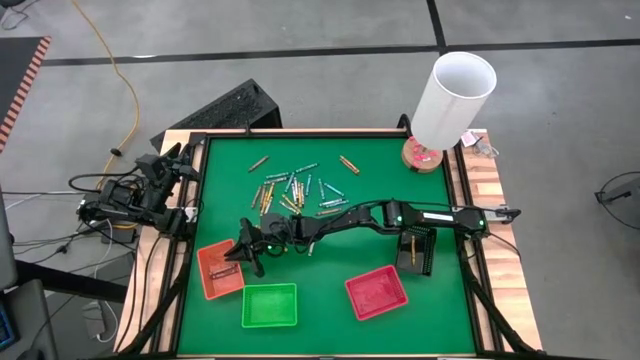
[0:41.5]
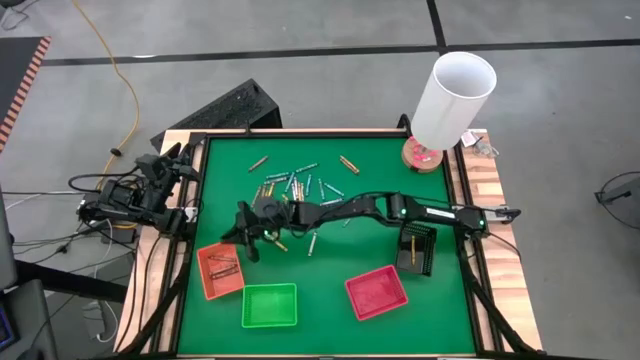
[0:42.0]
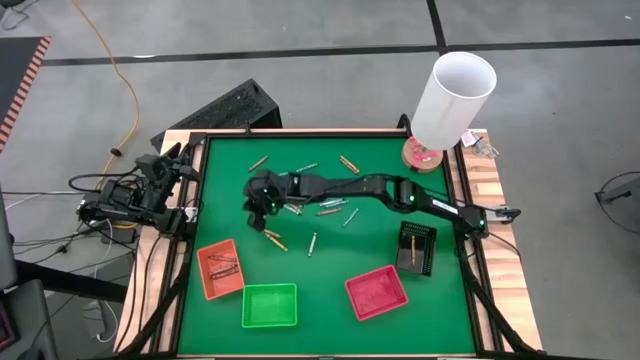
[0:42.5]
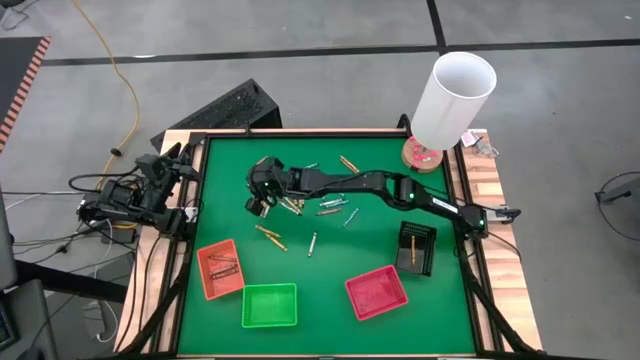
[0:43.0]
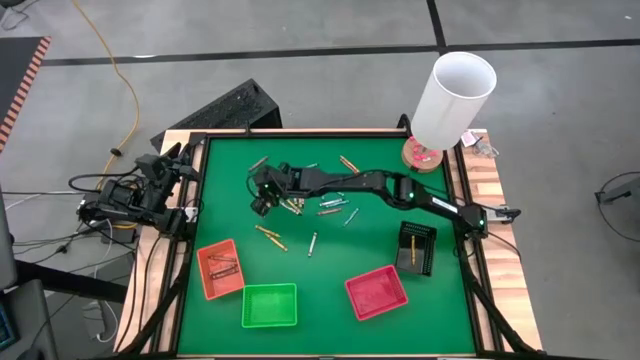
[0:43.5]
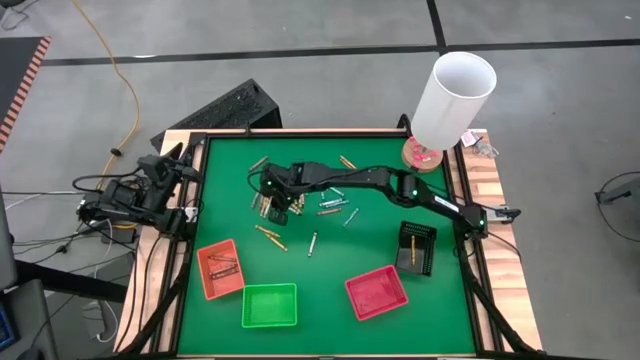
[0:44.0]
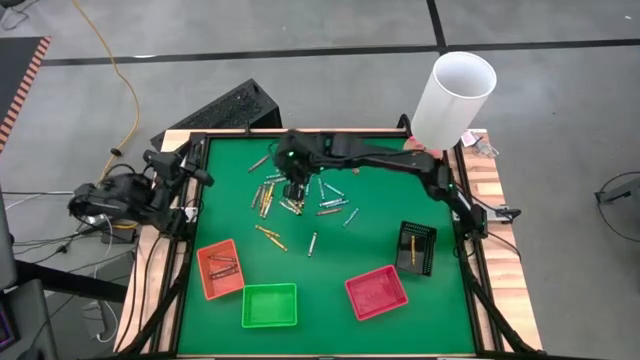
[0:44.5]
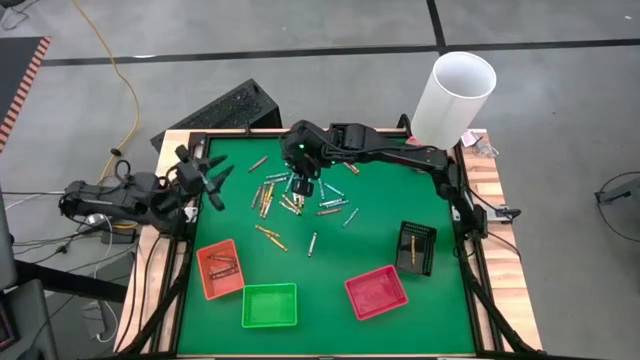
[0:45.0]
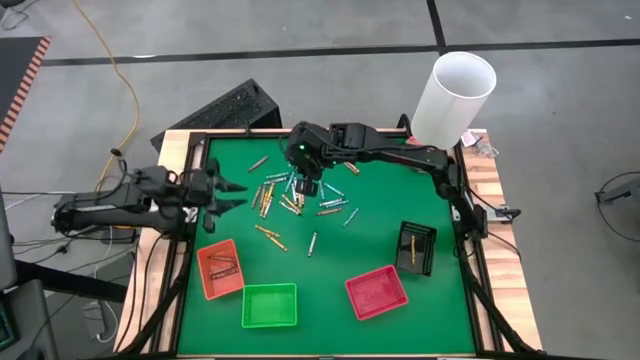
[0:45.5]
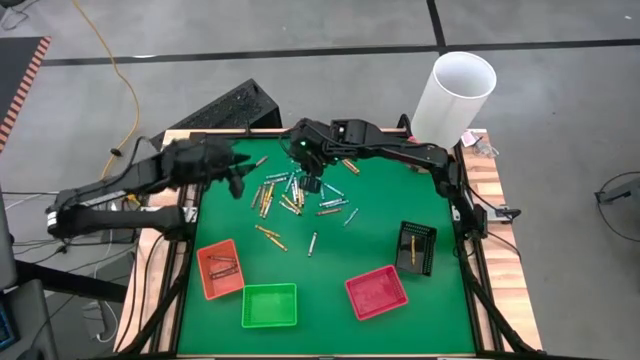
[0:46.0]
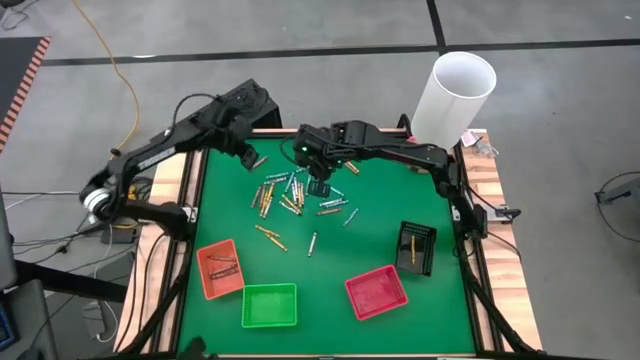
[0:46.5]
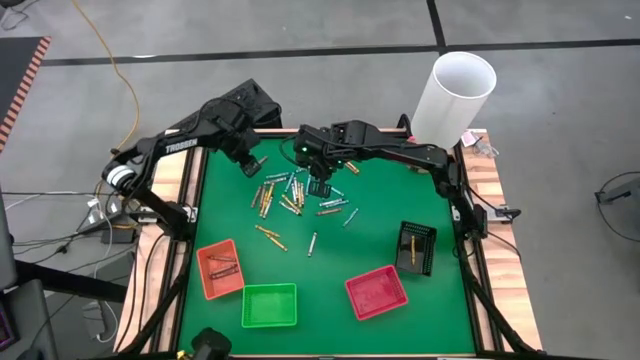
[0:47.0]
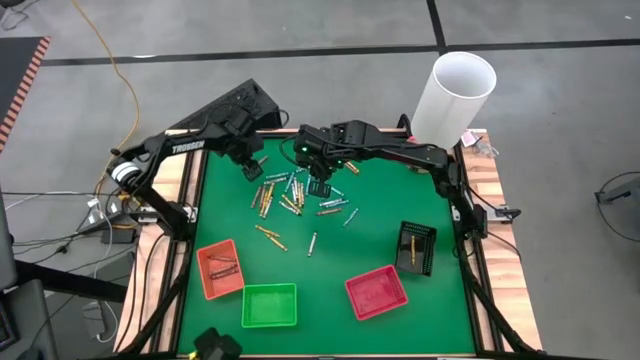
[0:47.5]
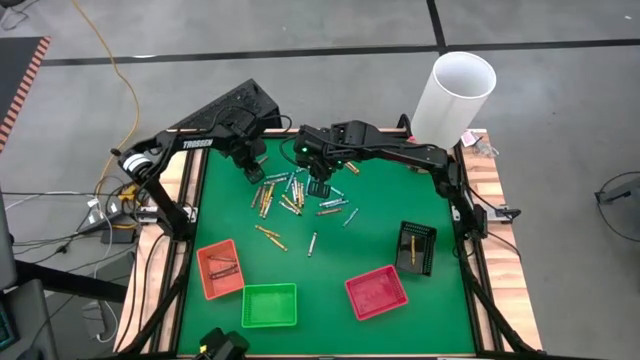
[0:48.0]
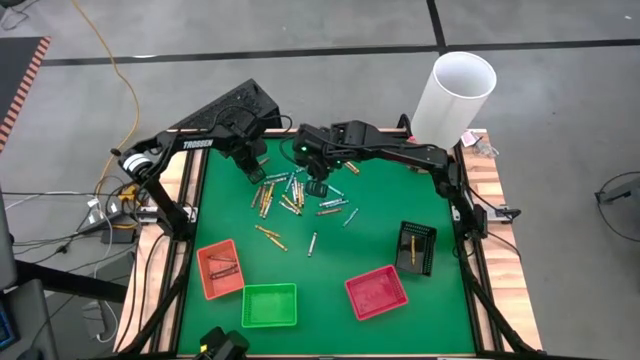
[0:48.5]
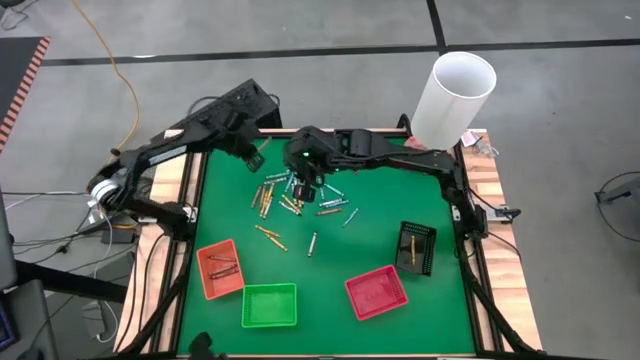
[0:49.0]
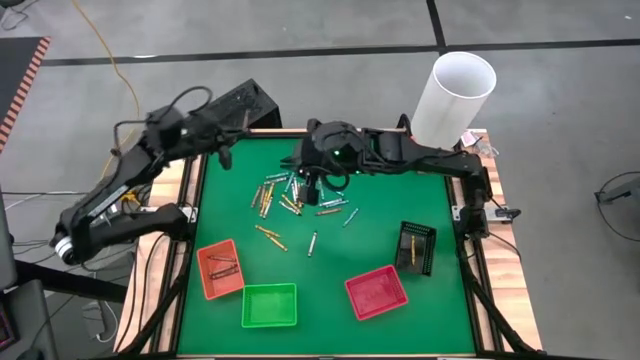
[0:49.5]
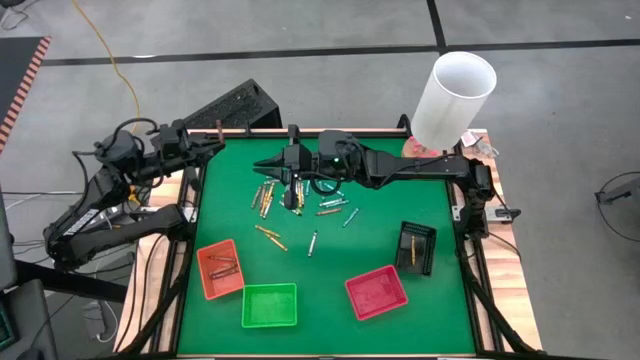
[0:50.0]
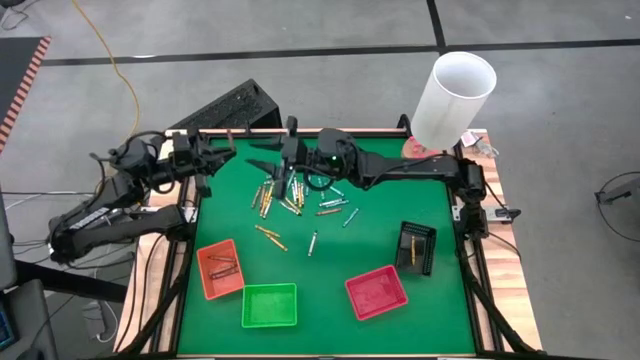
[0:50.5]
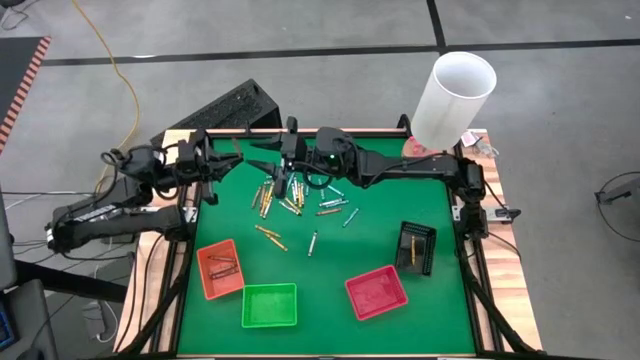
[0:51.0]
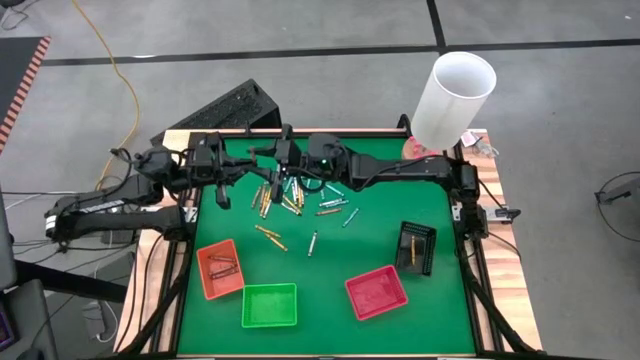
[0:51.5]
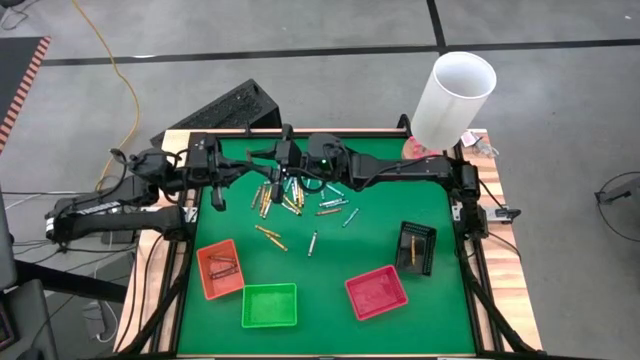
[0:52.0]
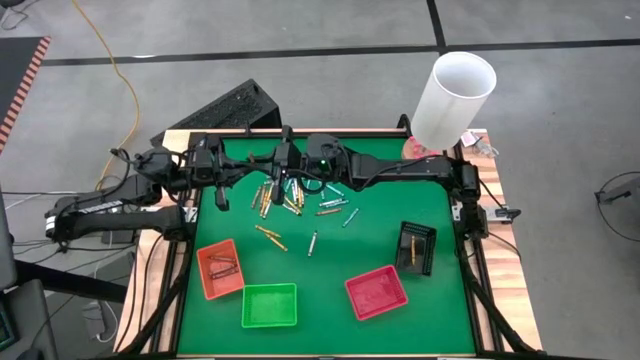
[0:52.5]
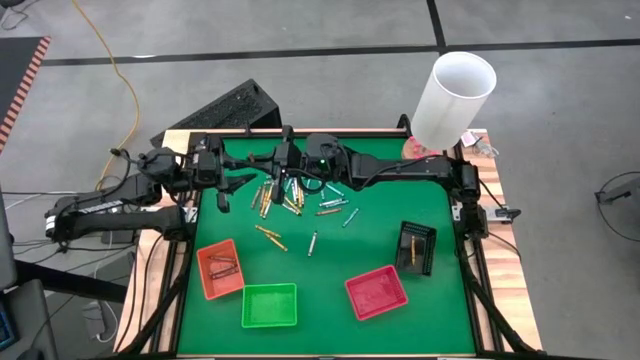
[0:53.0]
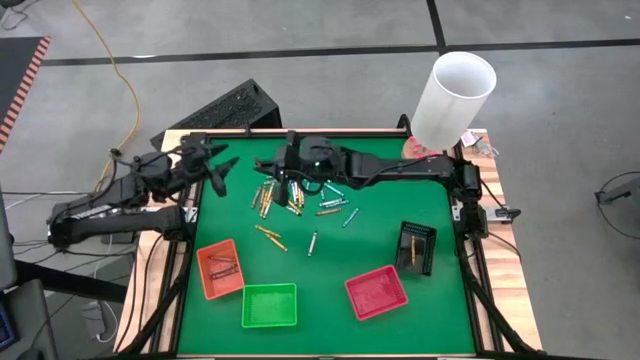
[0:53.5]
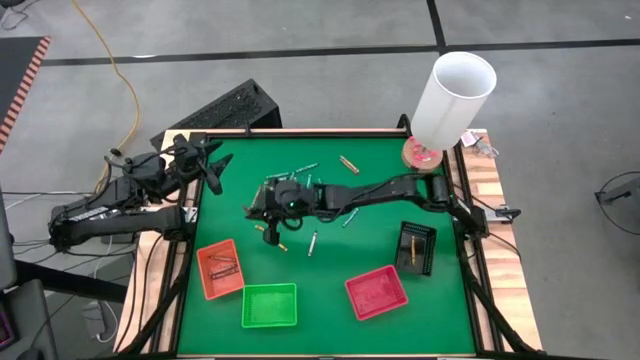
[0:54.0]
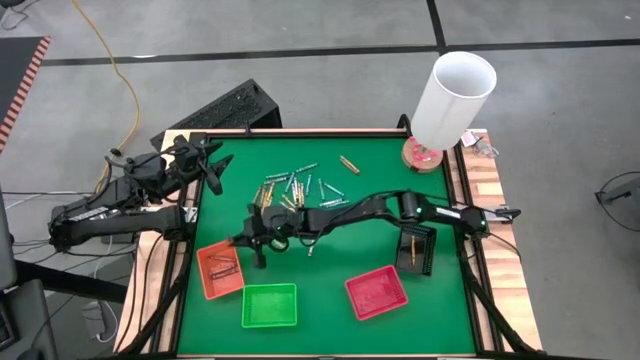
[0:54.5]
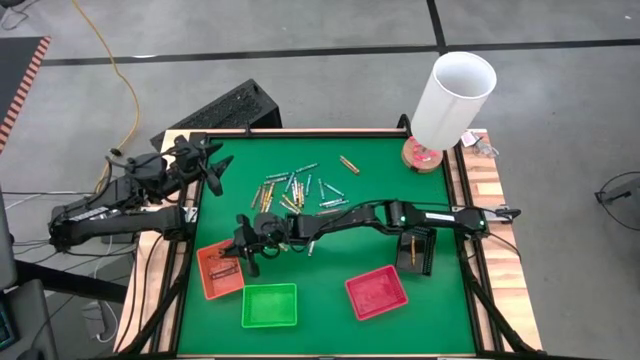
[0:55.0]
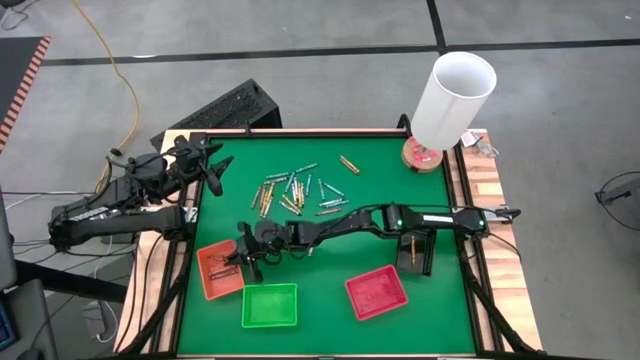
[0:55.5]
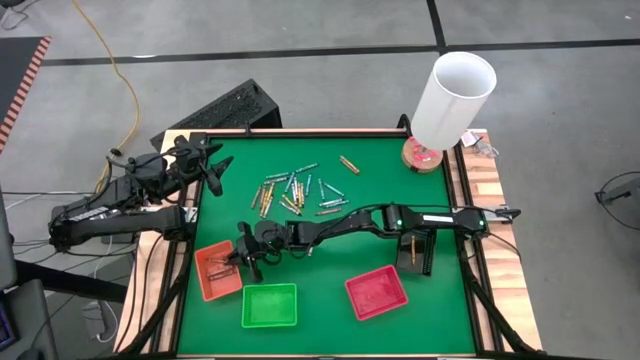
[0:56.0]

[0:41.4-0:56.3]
Task: Sort crayons
Put the brown crayon into the orange bin
